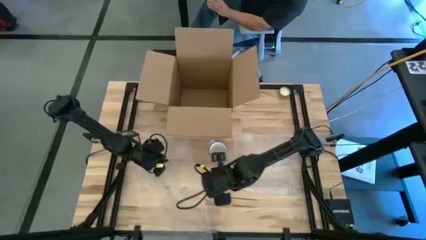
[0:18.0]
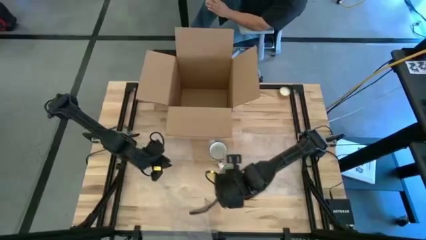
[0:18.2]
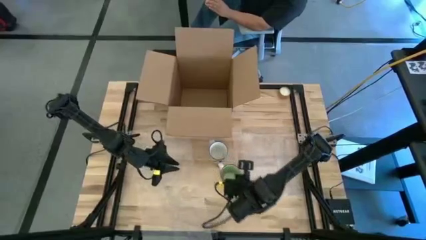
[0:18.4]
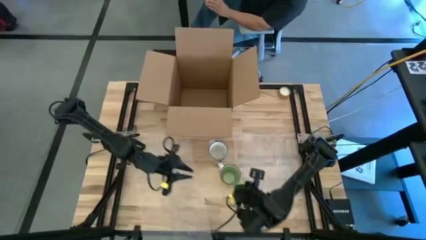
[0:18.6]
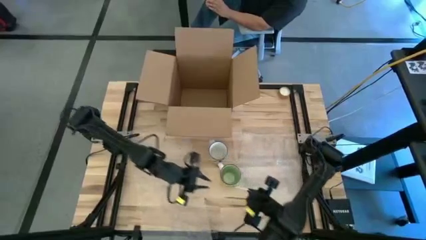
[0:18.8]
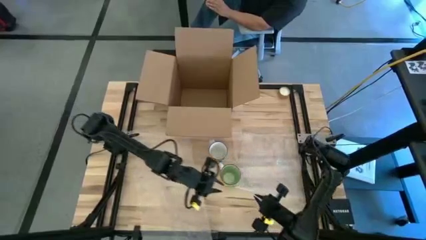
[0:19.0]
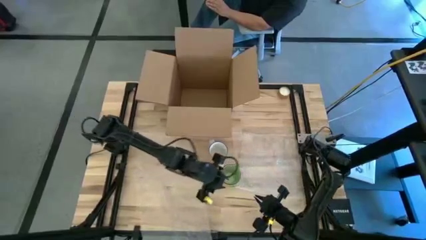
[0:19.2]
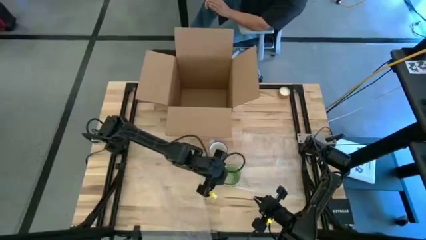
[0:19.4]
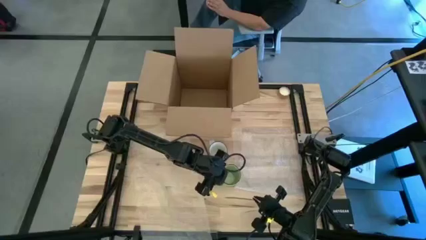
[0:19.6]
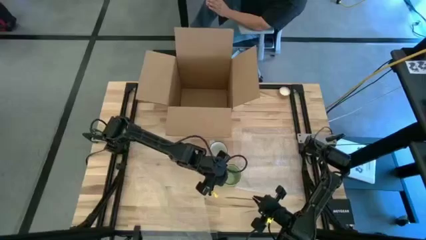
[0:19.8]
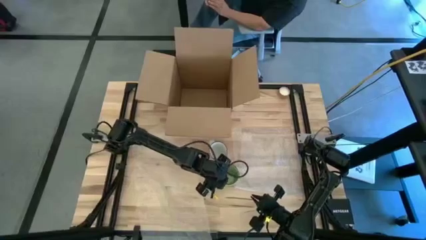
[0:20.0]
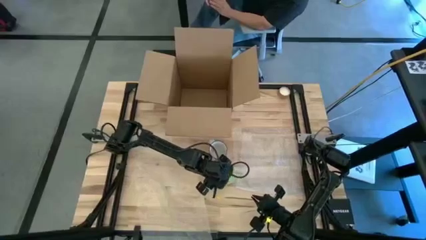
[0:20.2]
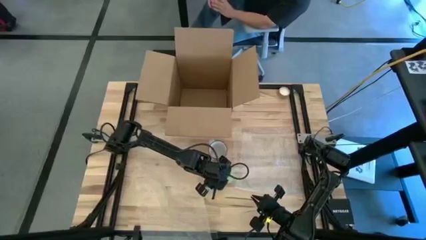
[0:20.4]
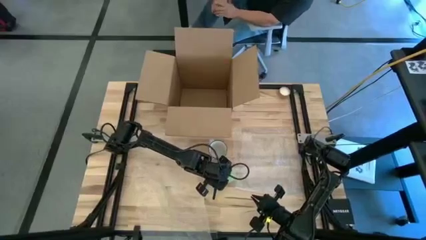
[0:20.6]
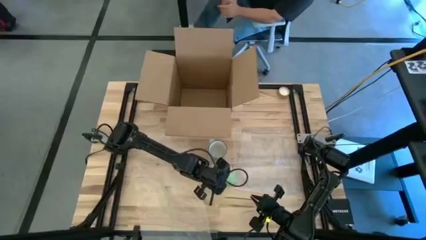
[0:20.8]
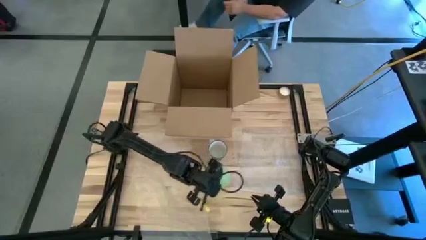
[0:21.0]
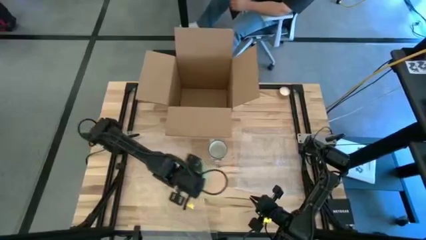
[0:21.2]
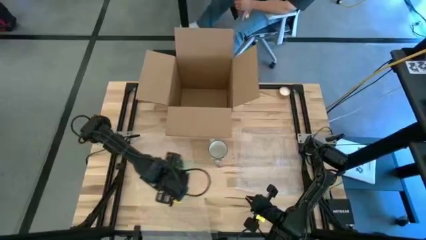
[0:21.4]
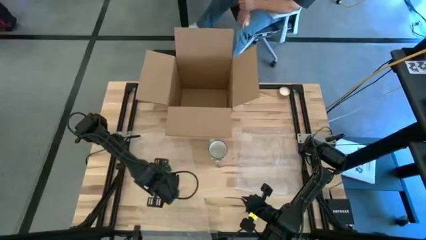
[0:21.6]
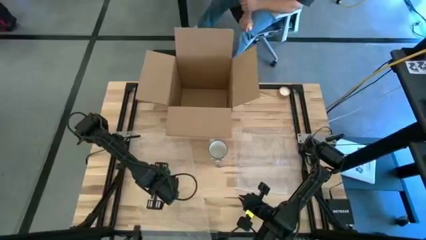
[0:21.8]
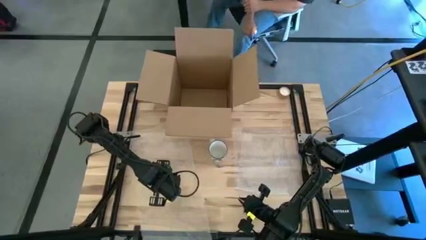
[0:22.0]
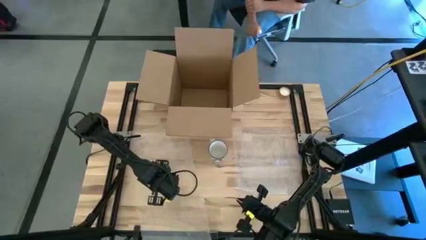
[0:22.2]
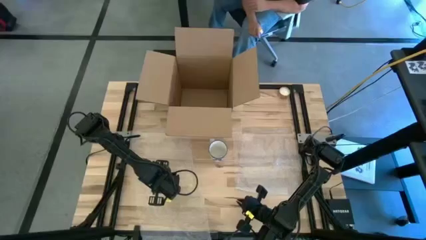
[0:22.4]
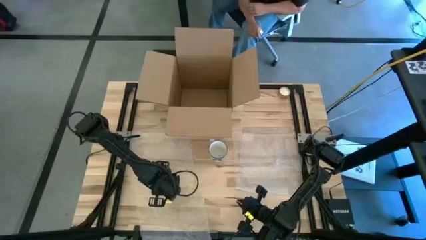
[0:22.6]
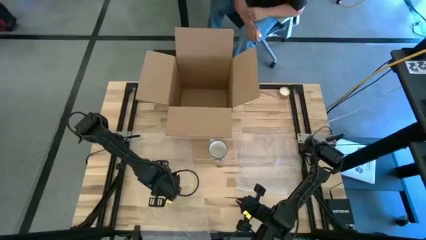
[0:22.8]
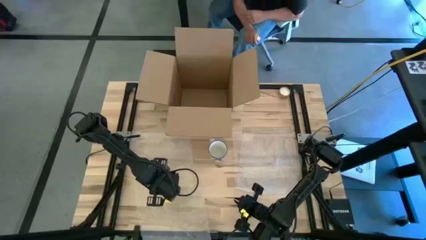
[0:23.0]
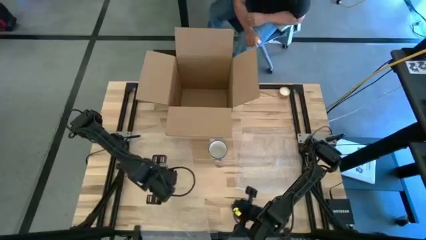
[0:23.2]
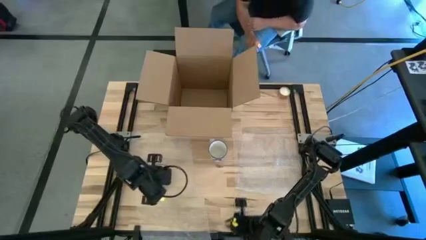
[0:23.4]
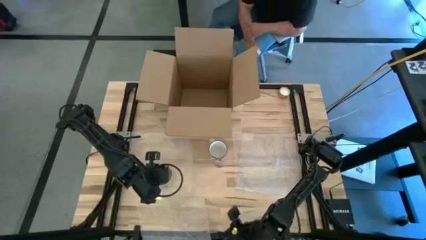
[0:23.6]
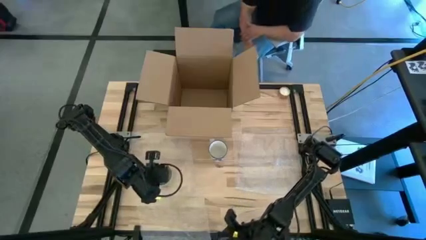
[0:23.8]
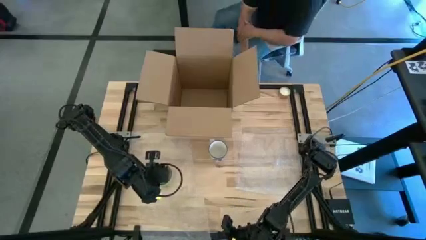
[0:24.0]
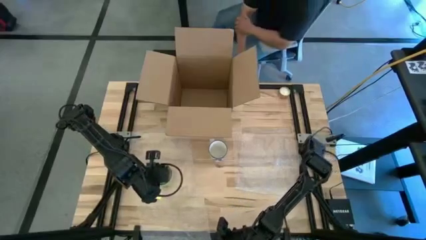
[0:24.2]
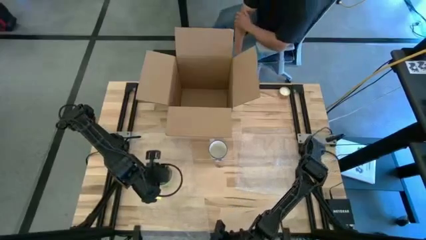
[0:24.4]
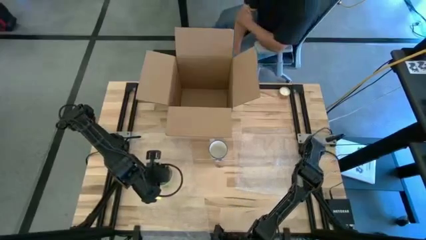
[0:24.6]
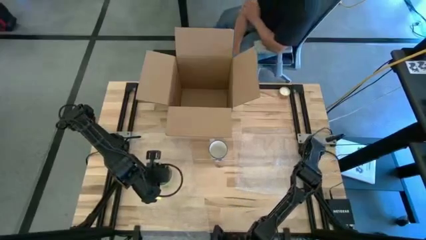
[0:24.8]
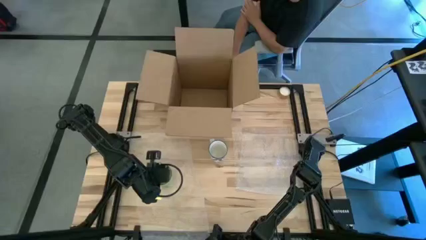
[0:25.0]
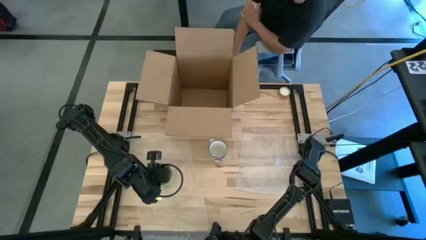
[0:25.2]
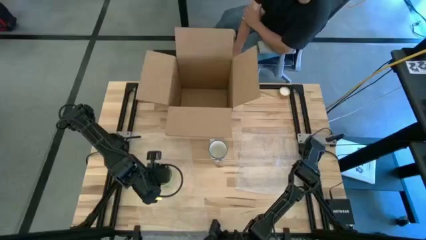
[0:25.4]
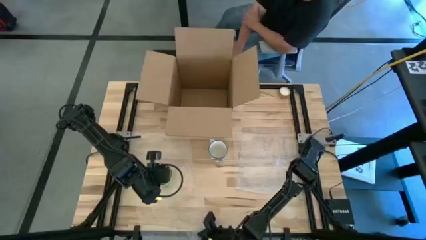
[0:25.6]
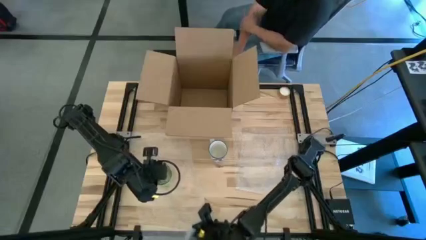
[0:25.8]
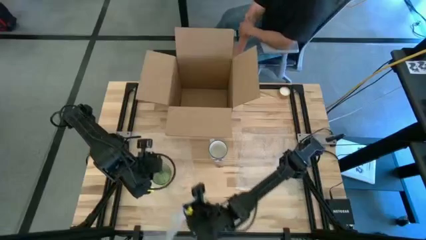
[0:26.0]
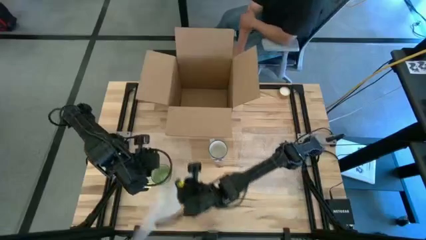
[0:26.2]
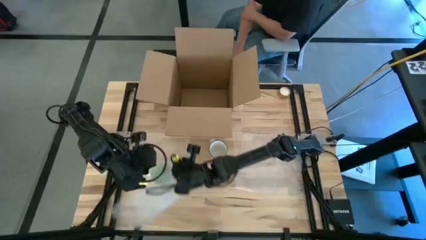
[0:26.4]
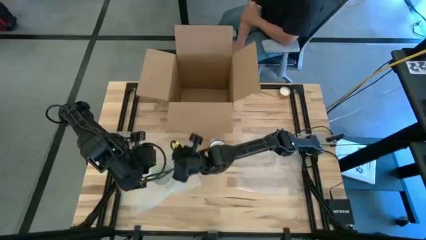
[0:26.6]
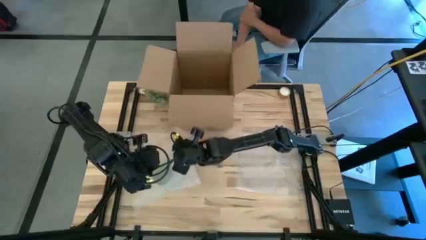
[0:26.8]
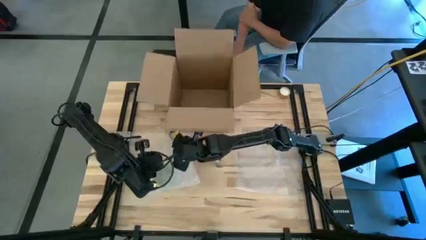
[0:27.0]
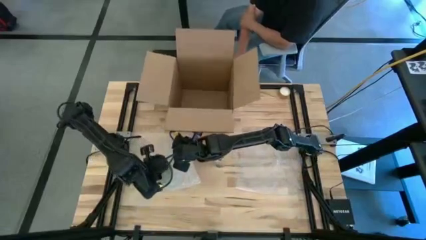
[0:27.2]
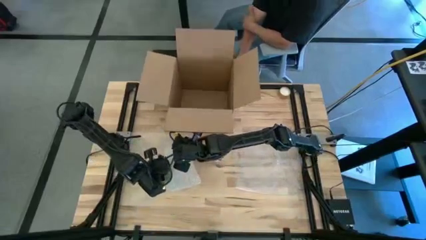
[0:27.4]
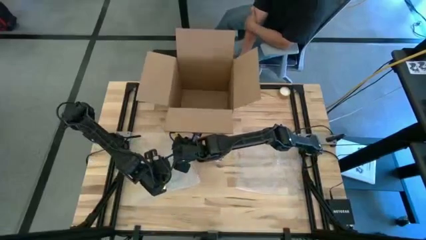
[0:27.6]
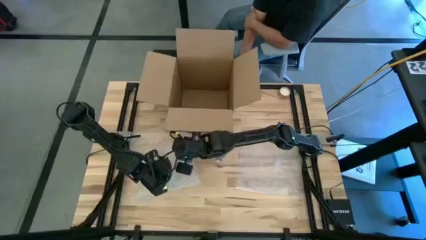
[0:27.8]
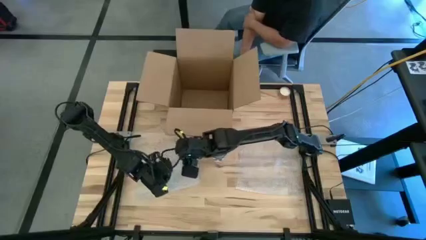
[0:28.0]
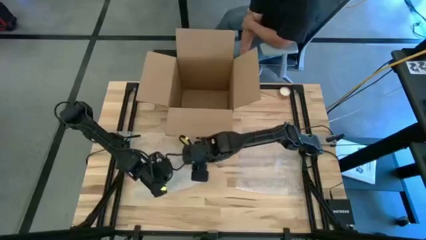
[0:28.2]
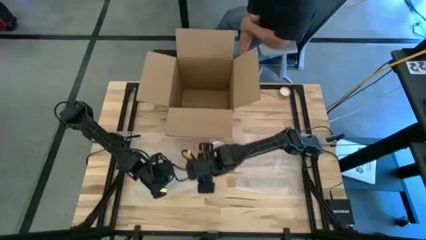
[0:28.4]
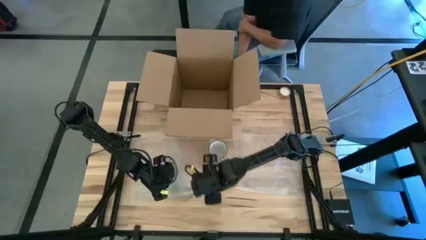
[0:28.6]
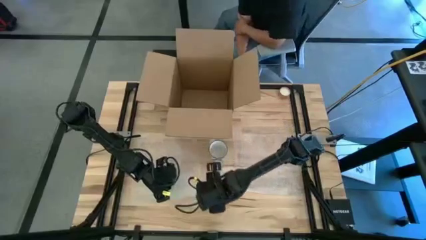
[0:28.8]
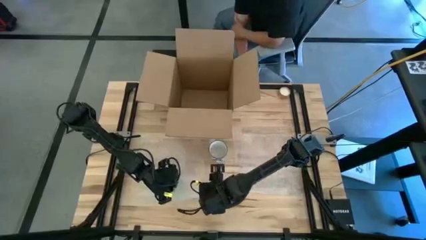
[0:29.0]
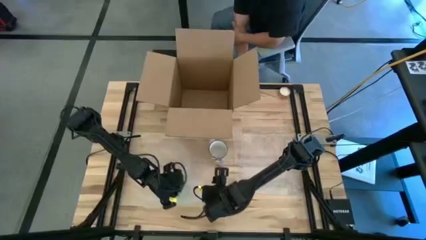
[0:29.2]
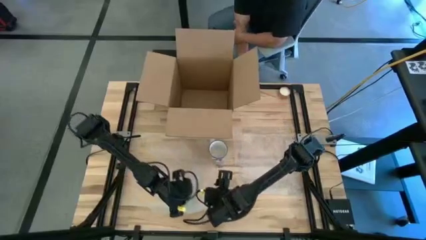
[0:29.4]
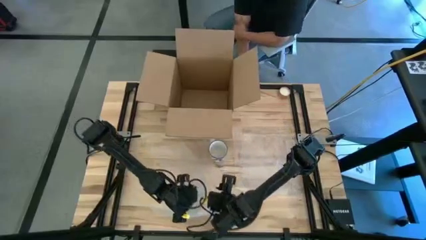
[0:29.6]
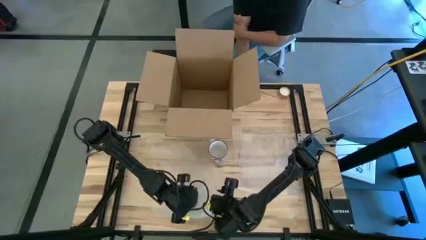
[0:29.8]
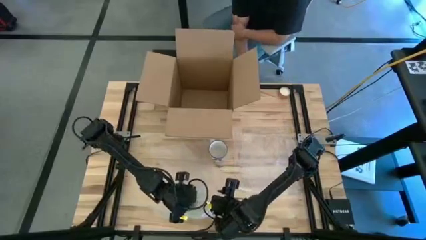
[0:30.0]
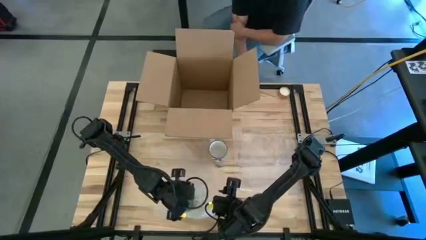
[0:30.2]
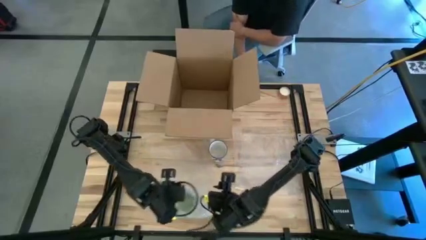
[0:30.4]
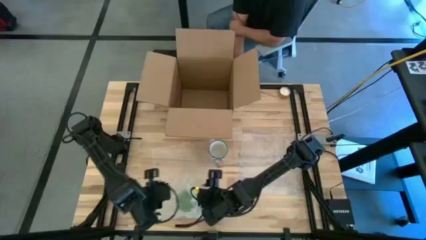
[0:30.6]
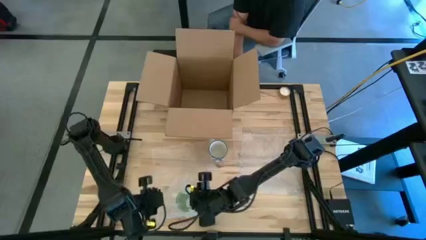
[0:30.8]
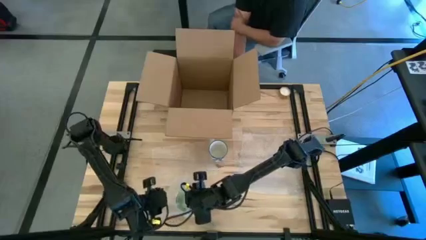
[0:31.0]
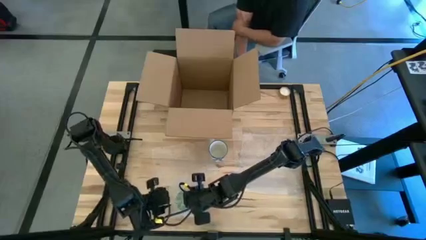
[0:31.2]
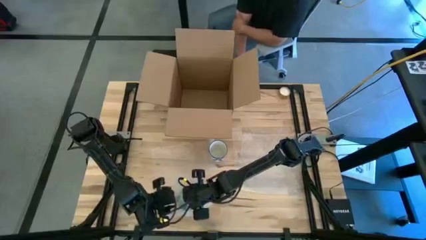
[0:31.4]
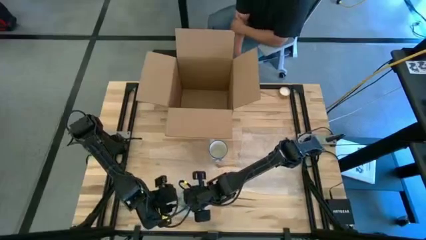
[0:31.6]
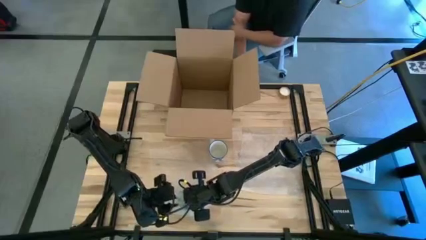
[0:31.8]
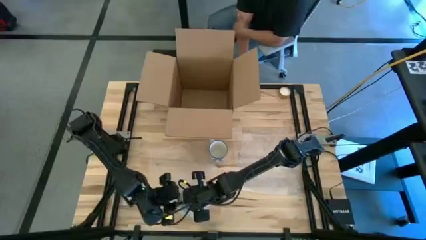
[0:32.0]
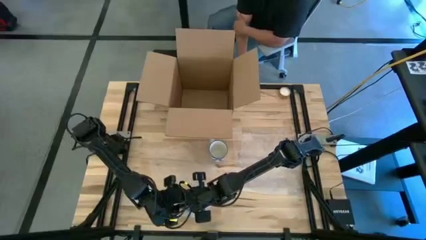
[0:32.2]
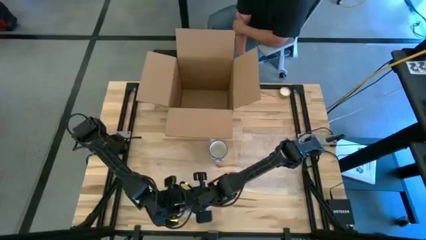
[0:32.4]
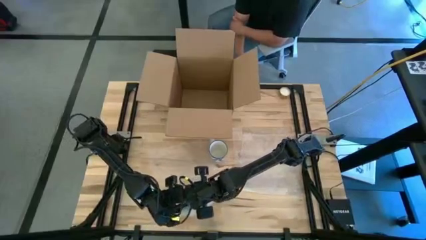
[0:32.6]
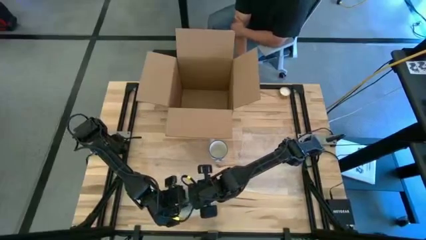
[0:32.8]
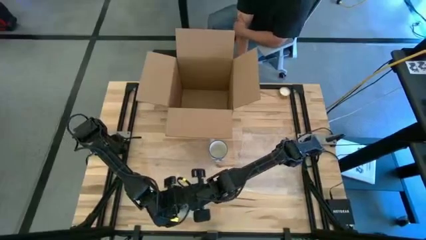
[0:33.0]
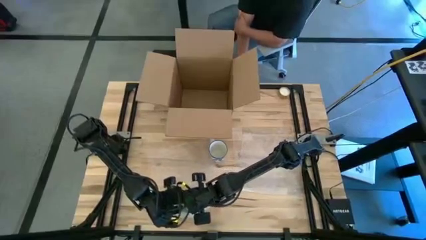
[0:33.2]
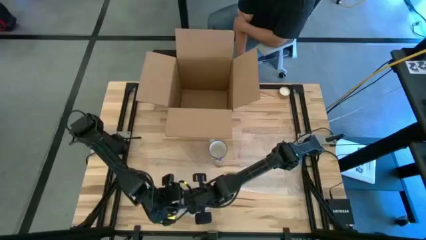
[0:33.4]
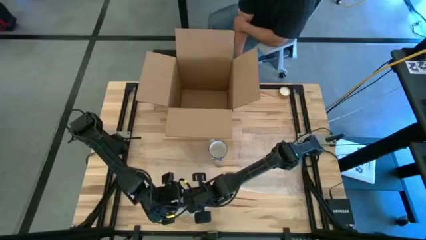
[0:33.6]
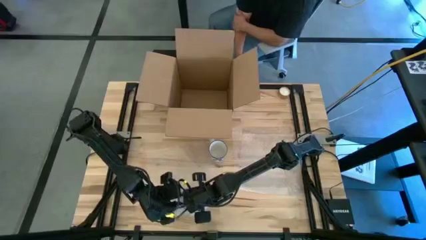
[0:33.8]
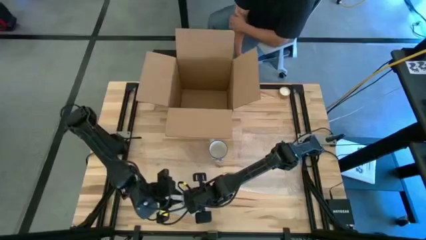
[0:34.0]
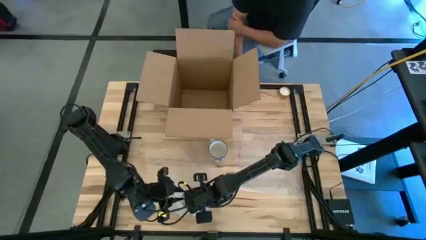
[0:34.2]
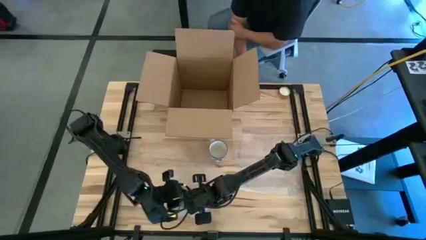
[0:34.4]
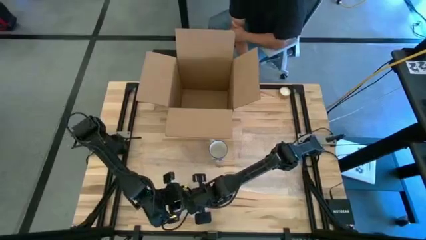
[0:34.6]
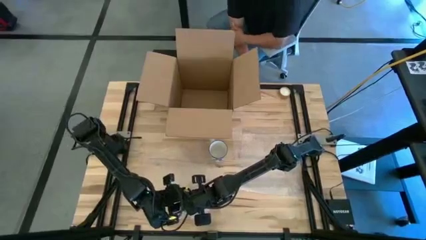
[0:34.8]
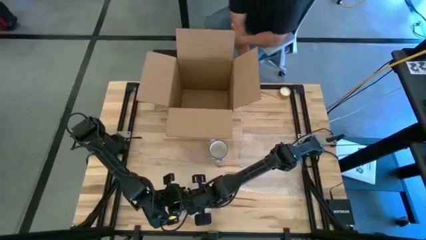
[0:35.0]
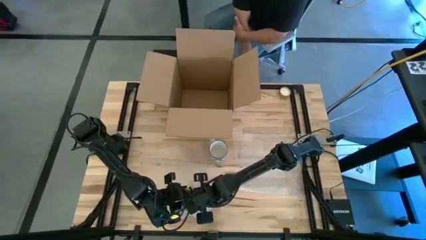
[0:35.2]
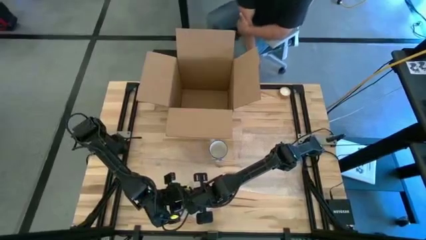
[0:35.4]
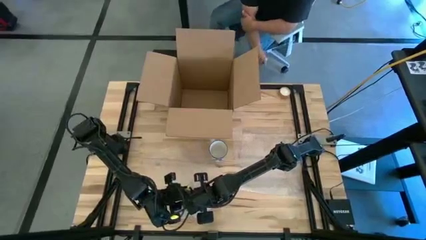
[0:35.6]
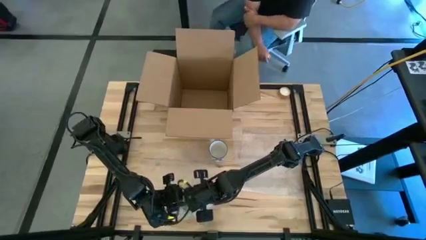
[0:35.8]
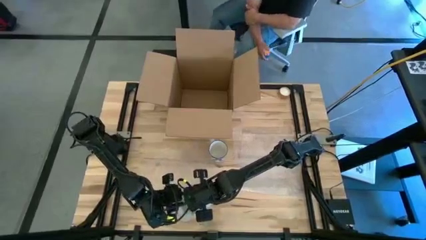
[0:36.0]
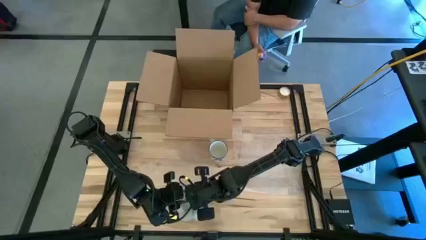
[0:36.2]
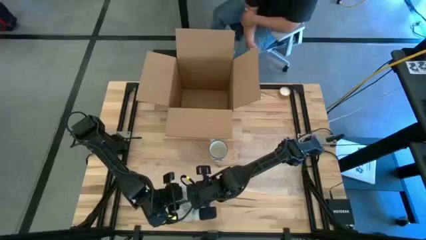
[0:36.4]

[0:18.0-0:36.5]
Task: wrap mug
Wrap the green mug with the left side transparent bubble wrap
